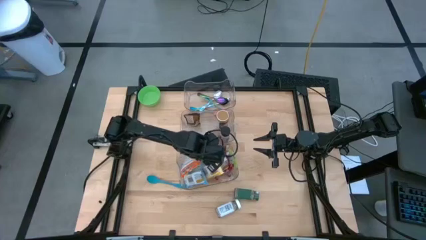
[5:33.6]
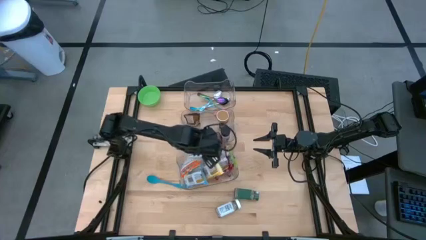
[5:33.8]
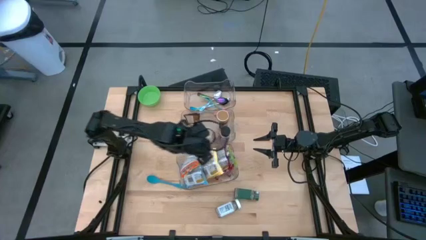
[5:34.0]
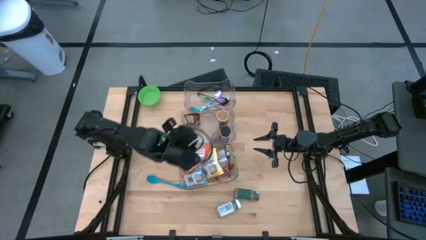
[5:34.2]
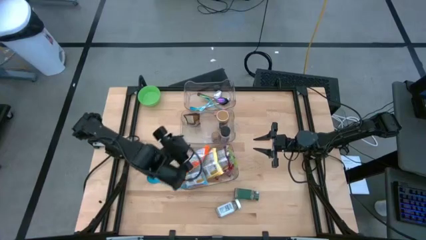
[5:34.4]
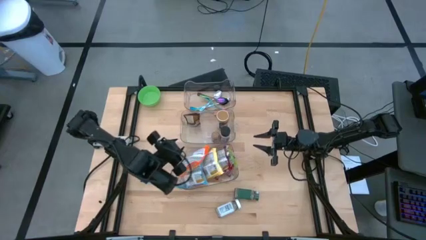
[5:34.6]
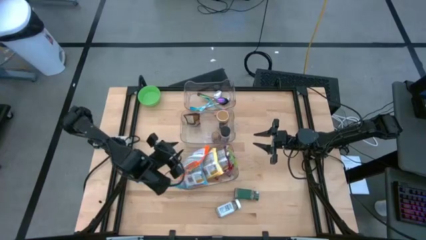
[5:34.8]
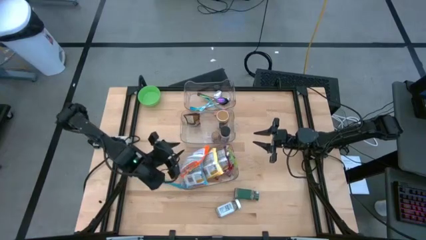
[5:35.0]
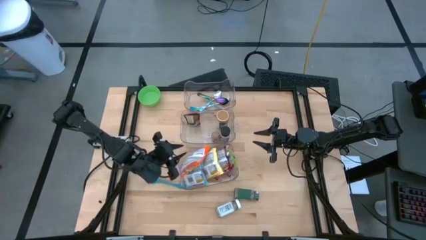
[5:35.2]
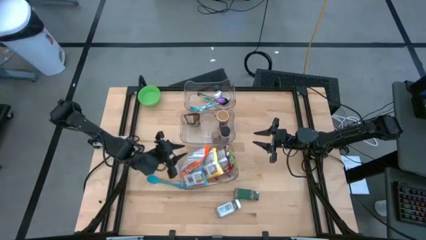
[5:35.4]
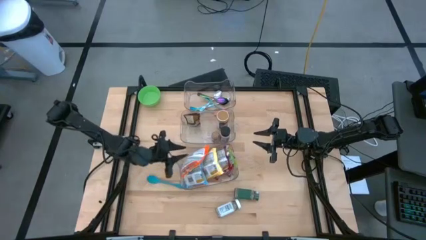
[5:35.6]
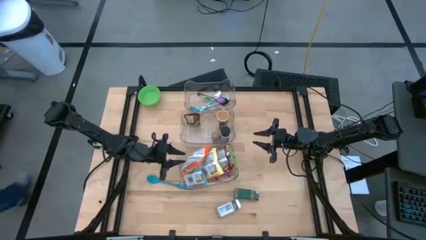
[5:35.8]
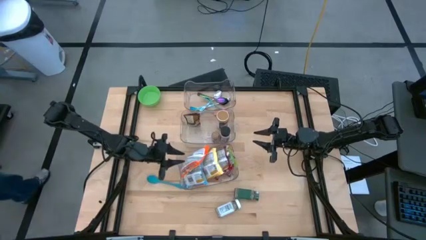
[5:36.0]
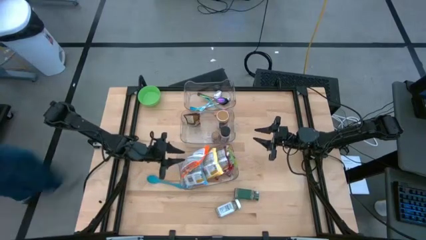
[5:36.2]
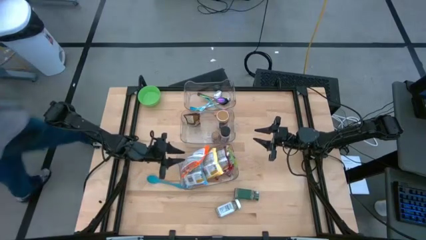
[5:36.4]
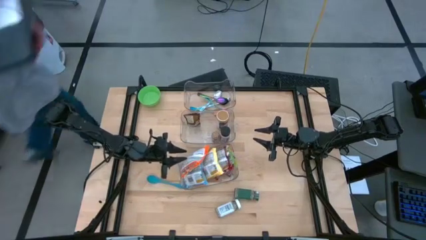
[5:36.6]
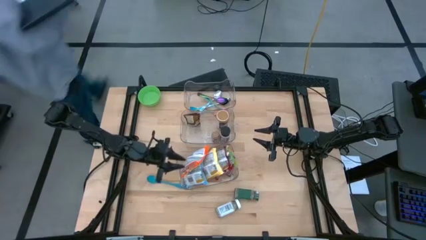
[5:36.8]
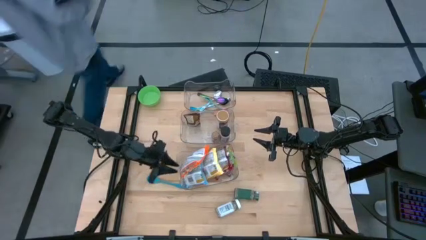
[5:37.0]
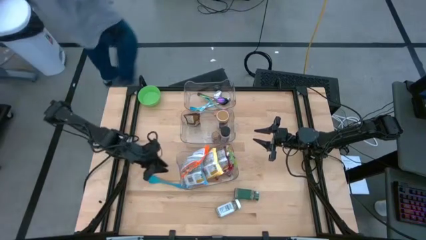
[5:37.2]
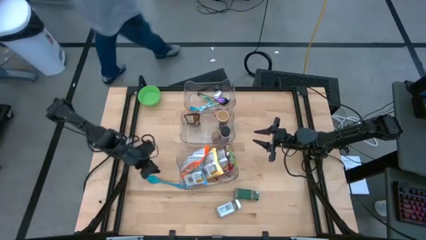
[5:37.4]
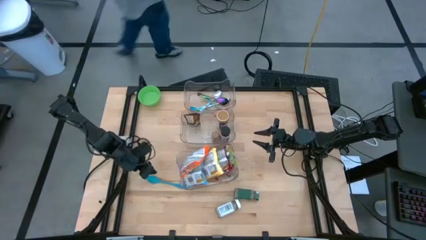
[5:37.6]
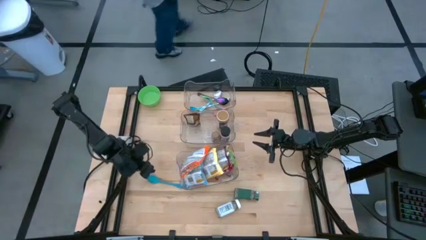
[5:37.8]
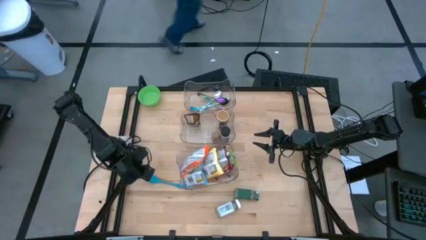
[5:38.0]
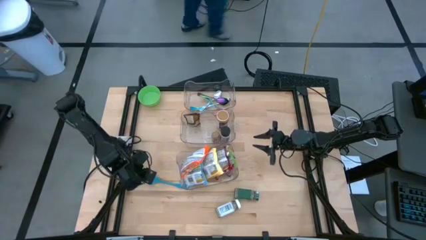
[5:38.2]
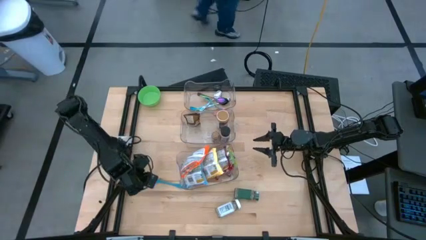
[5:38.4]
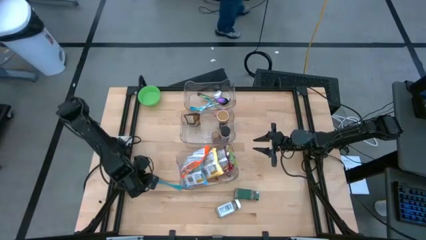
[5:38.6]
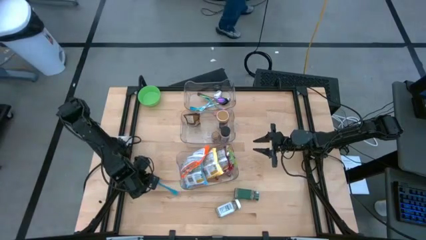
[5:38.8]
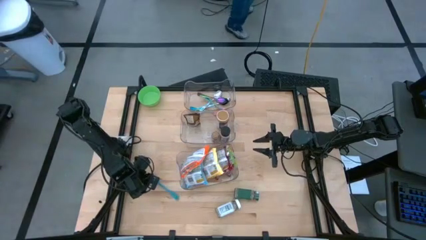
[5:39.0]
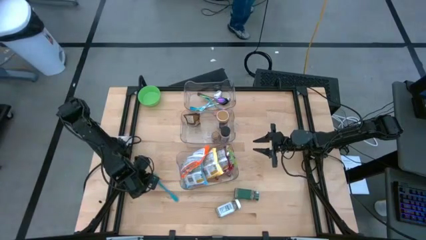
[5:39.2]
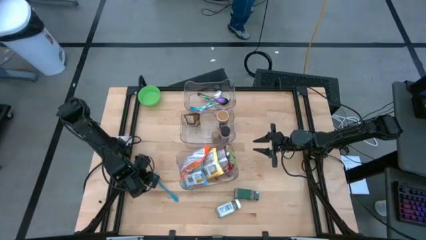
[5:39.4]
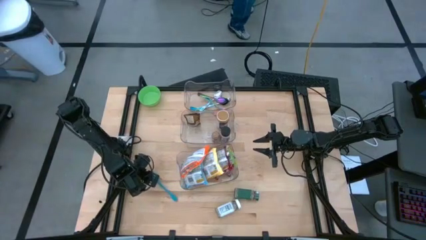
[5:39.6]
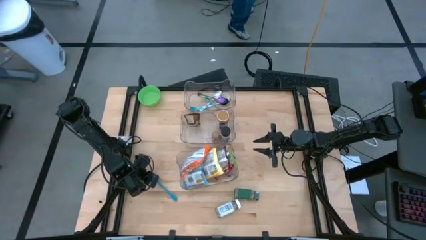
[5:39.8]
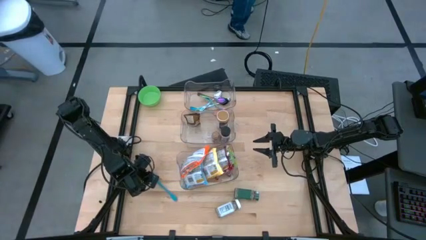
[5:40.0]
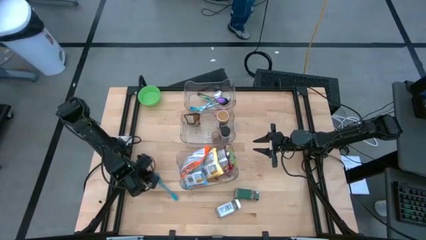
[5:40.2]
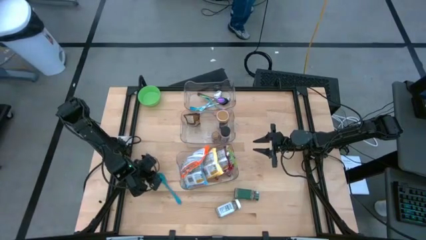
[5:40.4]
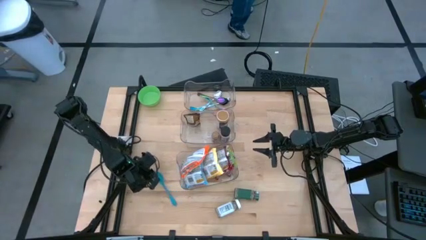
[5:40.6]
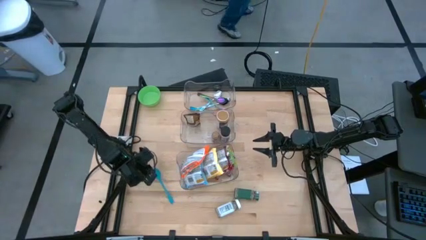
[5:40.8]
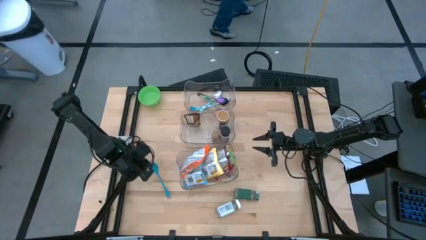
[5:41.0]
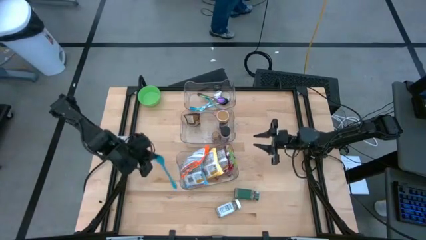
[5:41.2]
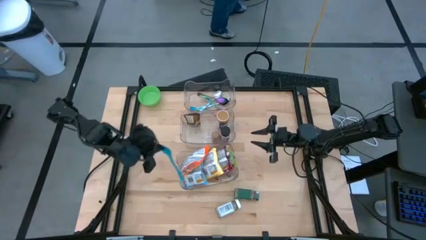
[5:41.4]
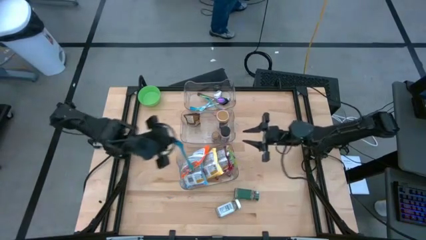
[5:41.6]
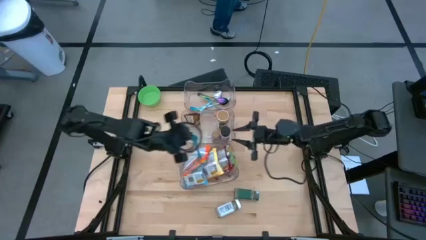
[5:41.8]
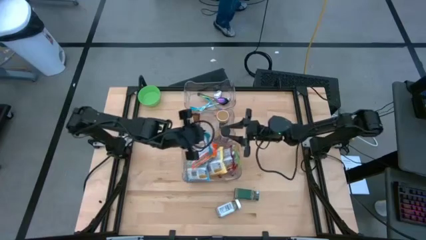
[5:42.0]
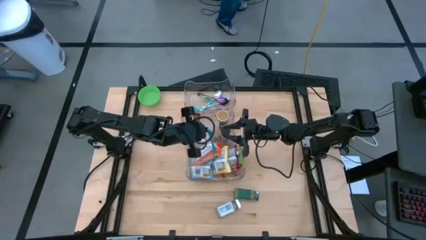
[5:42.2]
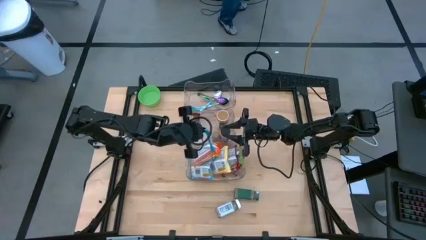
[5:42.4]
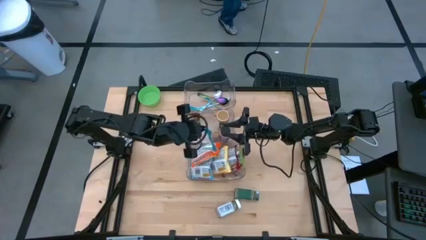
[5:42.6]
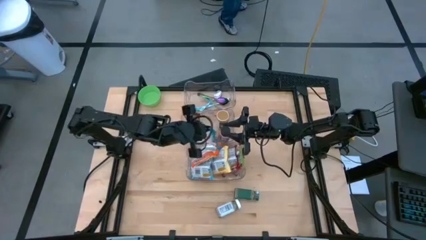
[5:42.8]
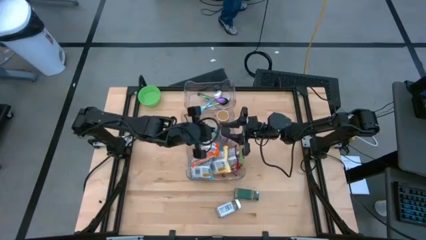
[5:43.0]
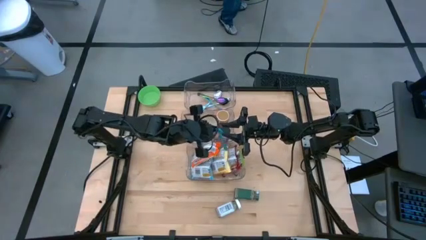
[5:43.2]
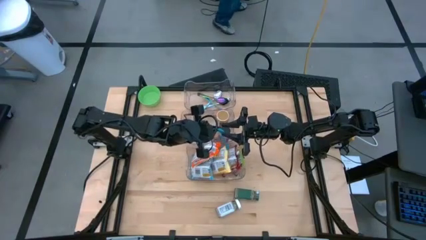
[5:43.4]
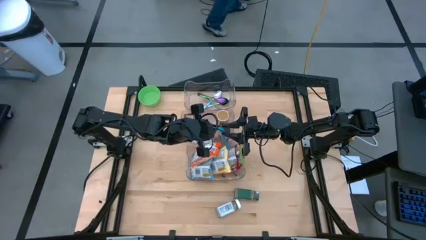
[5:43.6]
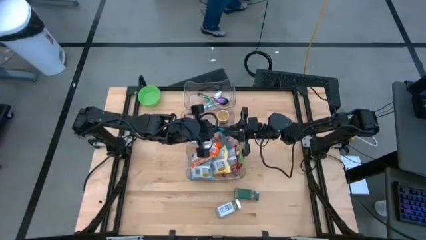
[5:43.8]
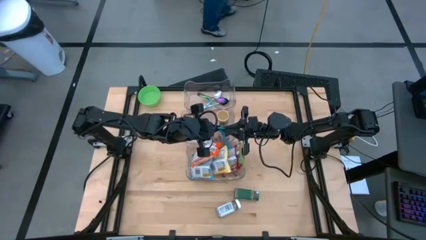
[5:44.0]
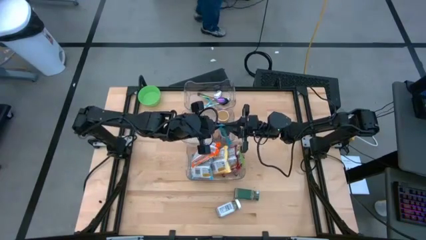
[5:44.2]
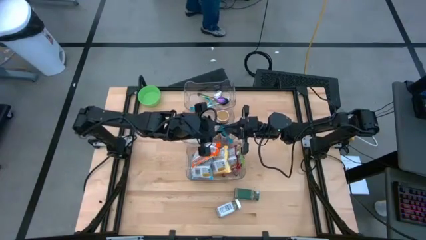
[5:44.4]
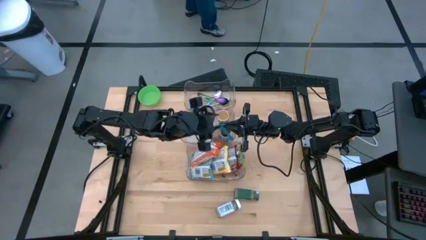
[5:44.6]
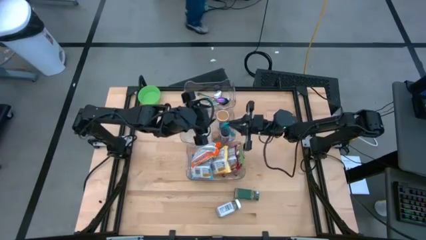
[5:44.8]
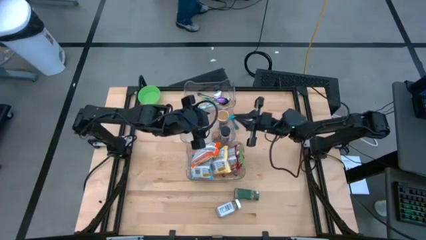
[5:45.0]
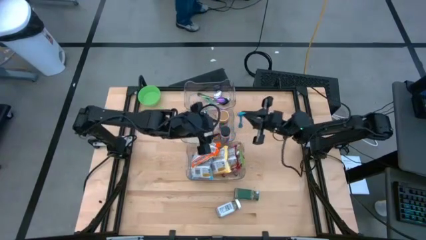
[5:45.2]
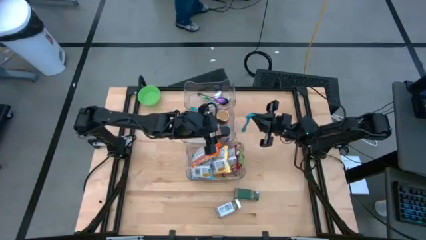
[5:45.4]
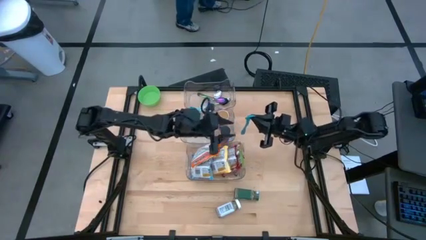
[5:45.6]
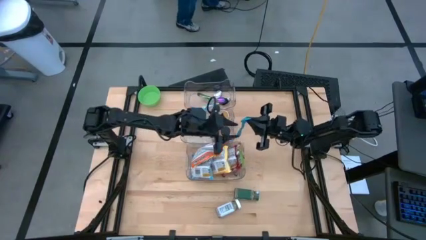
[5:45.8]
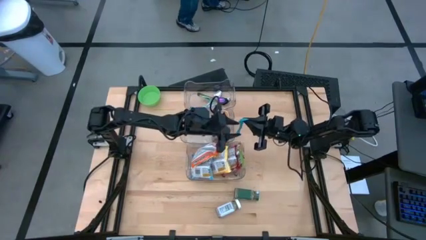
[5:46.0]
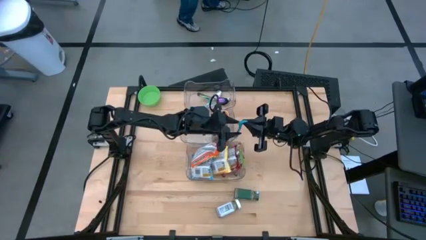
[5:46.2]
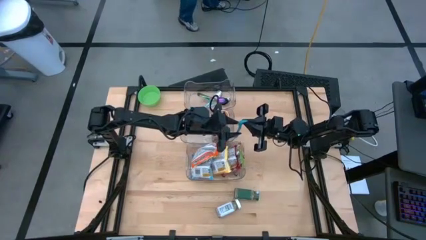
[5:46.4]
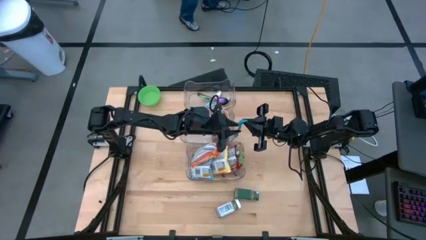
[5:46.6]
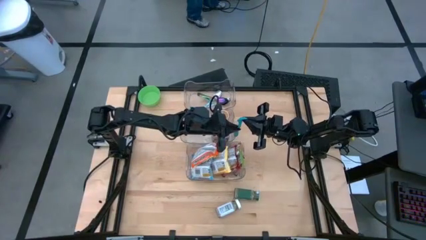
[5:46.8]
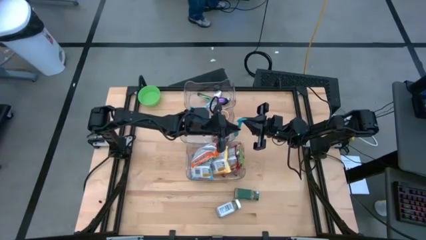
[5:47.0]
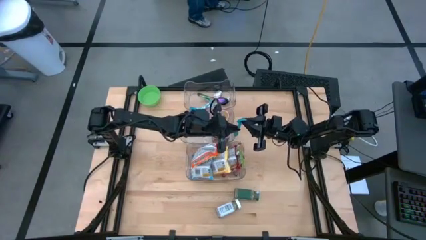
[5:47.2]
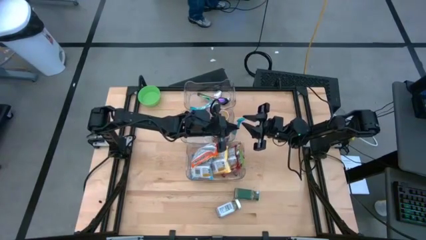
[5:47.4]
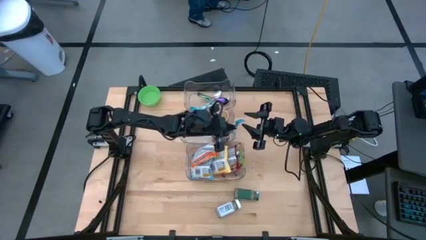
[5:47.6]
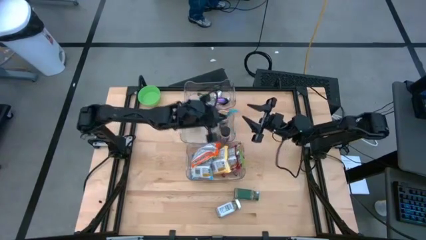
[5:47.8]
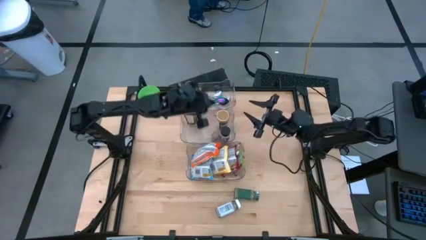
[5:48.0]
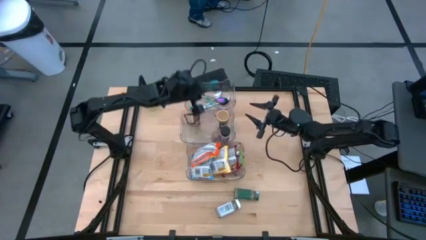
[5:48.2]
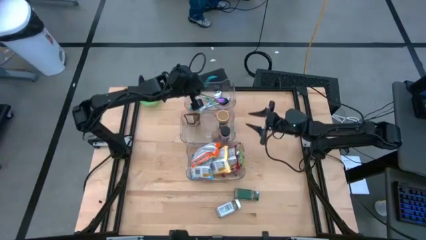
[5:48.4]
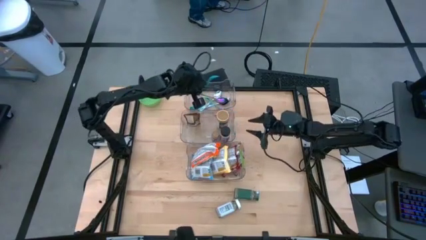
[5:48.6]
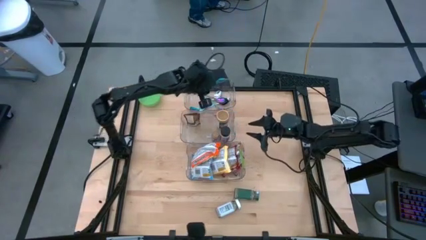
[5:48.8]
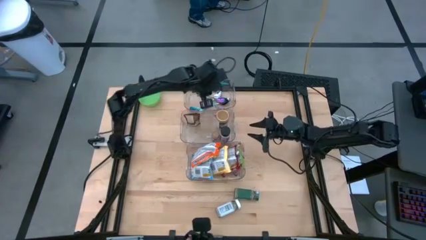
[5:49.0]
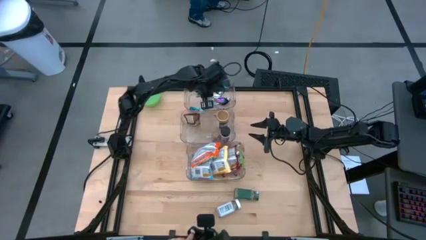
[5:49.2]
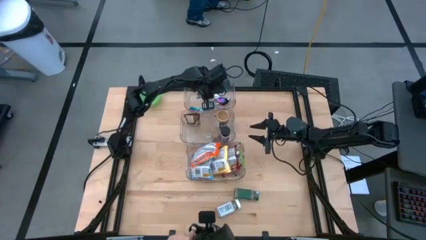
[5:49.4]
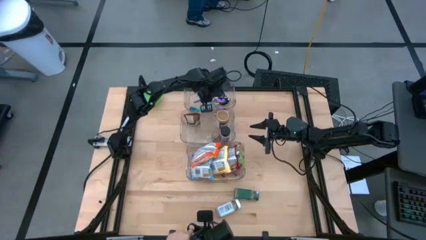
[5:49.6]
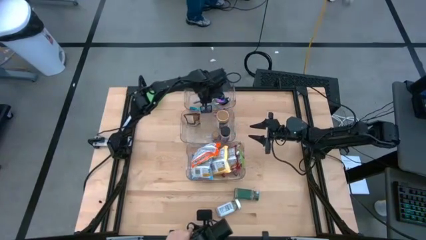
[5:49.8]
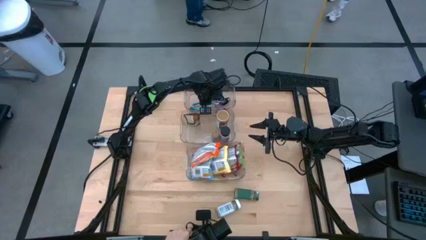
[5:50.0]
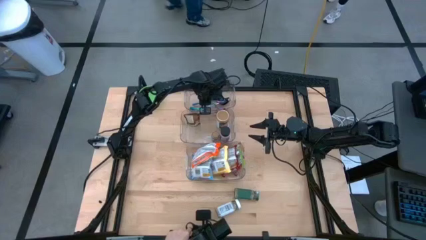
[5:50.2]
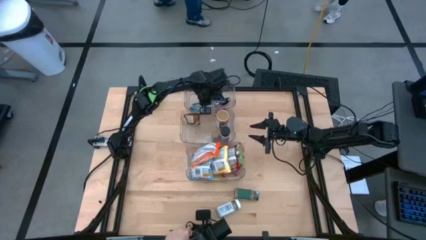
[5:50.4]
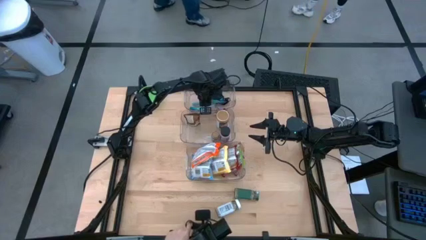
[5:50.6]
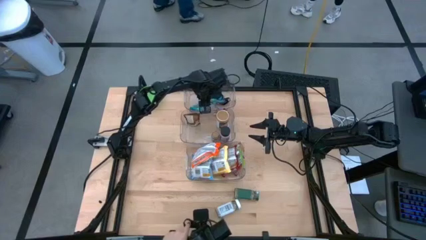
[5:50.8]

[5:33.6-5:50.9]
Task: Pick & Place Food Item
Put the light blue spoon into the top transparent bin
